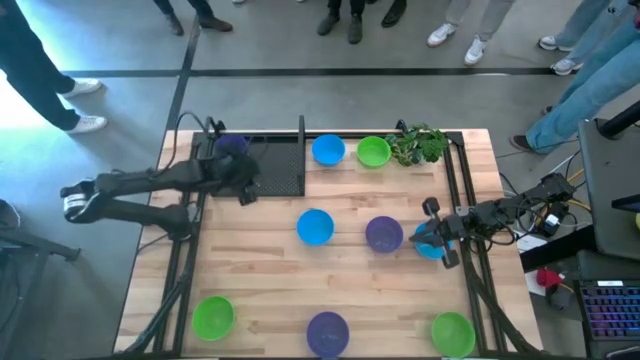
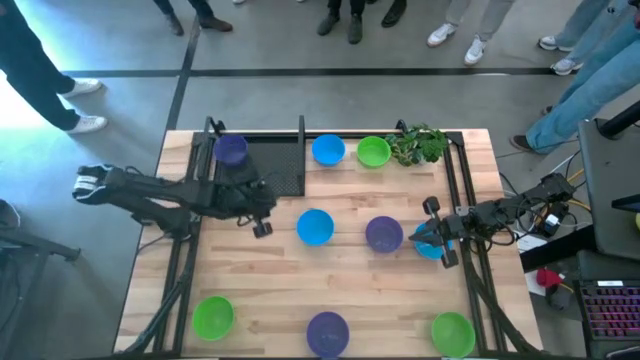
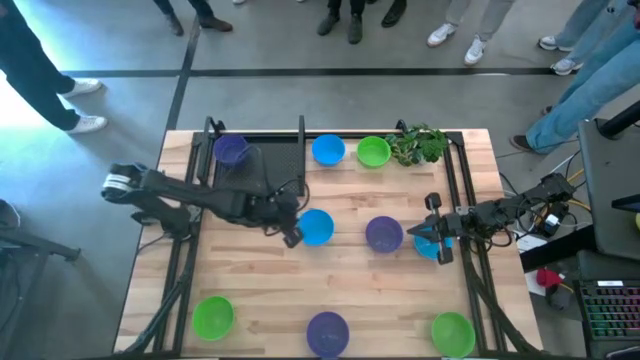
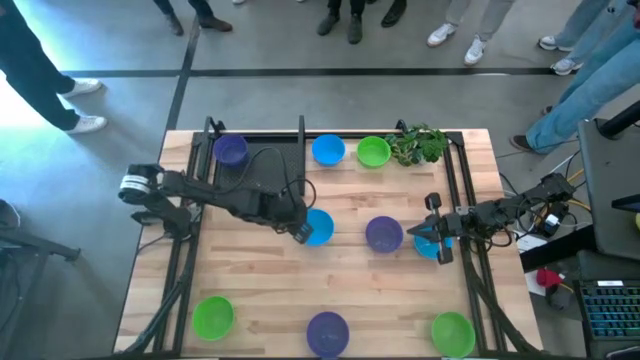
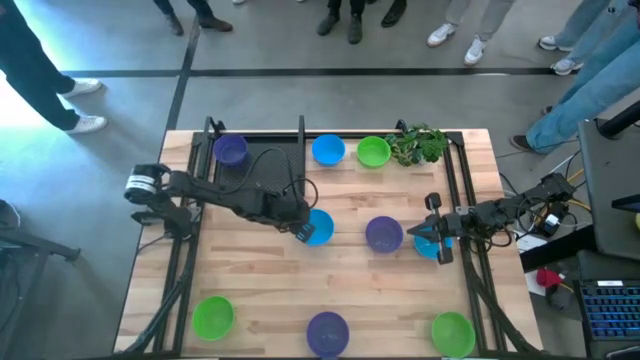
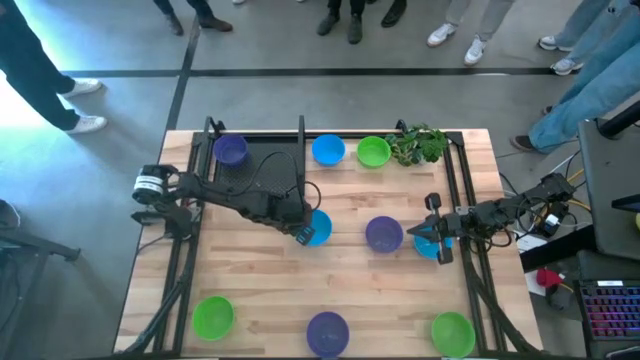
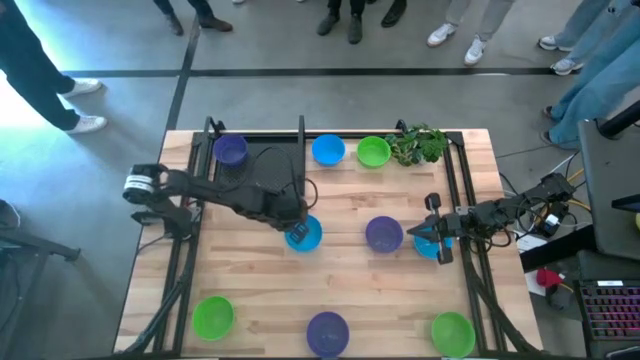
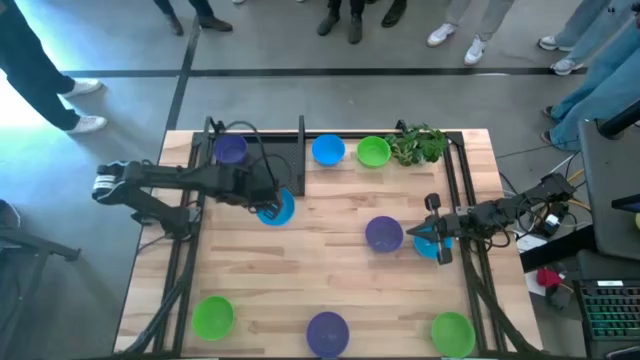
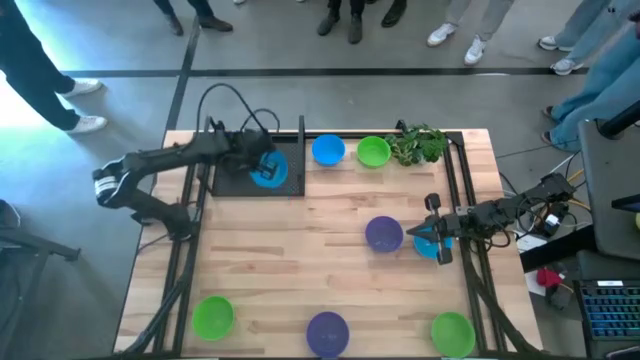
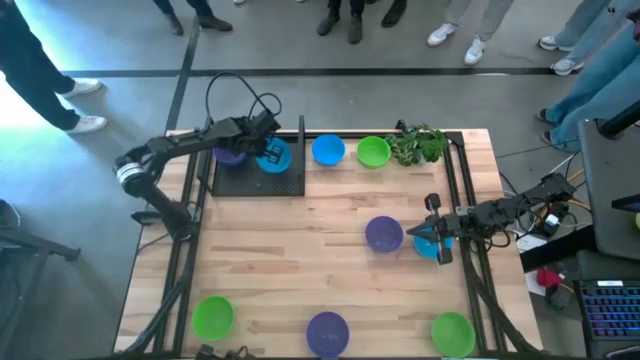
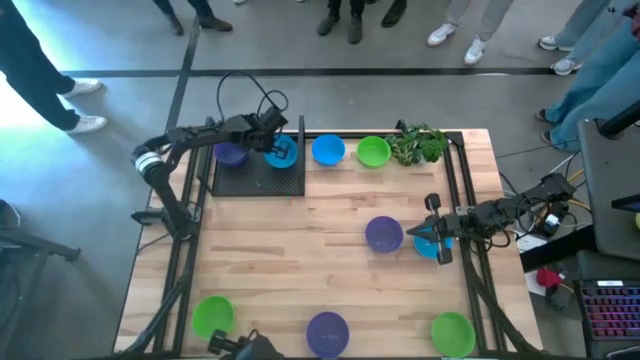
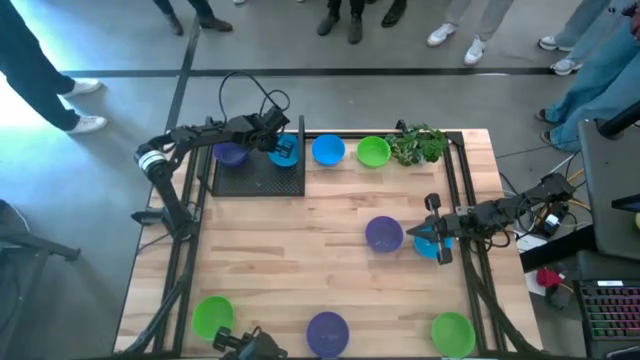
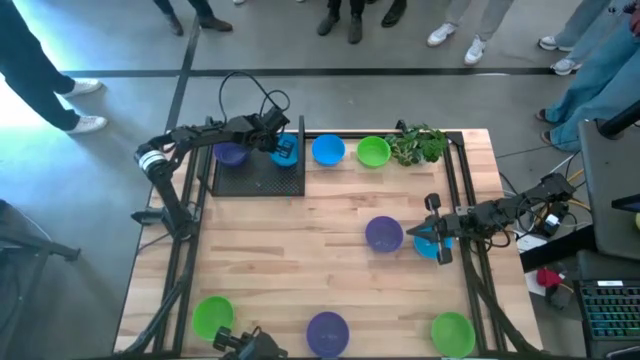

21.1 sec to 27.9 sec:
Task: Pick & Place Mini bowls
Put the bottom left blue bowl on the shelf

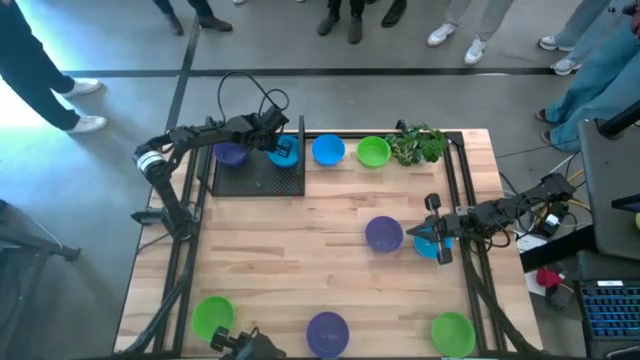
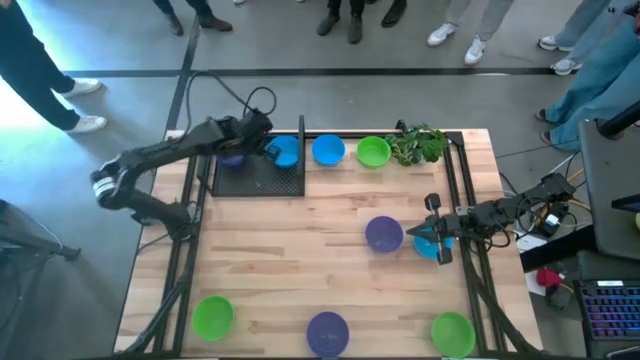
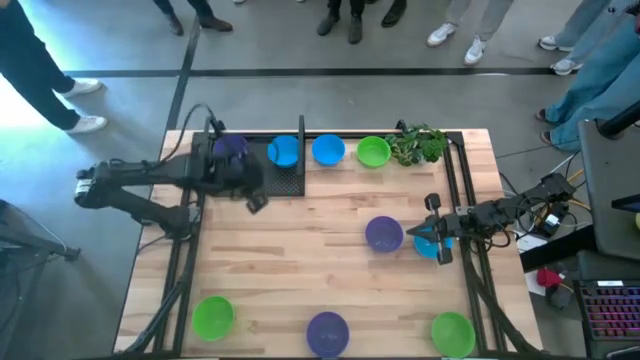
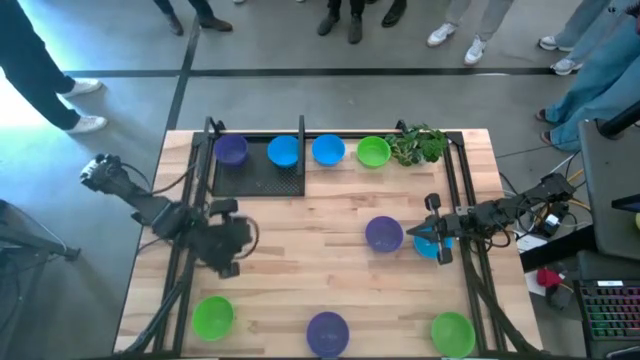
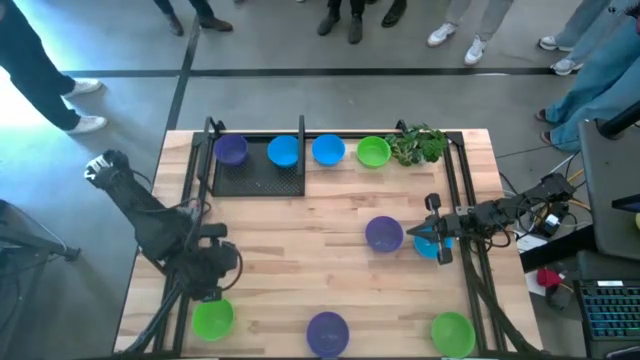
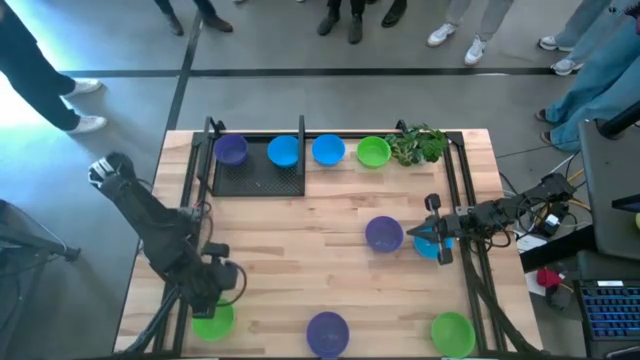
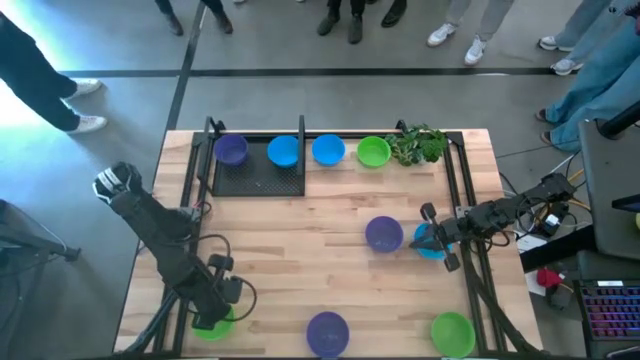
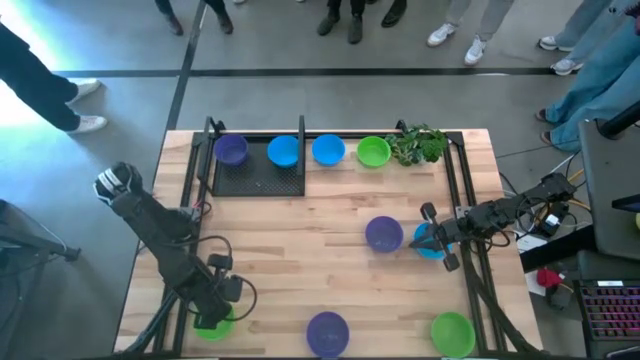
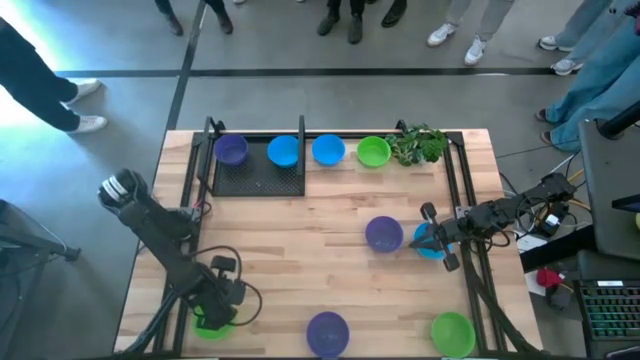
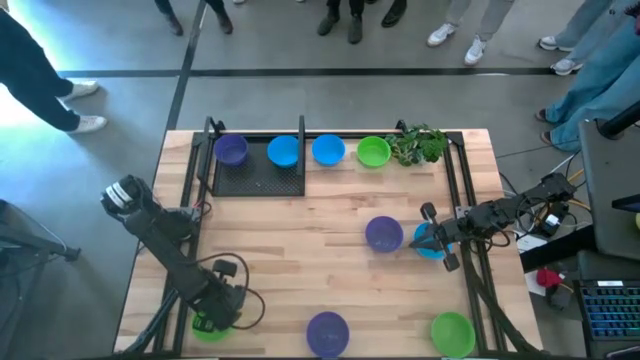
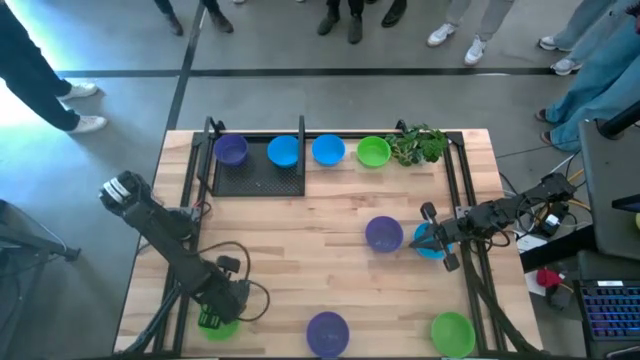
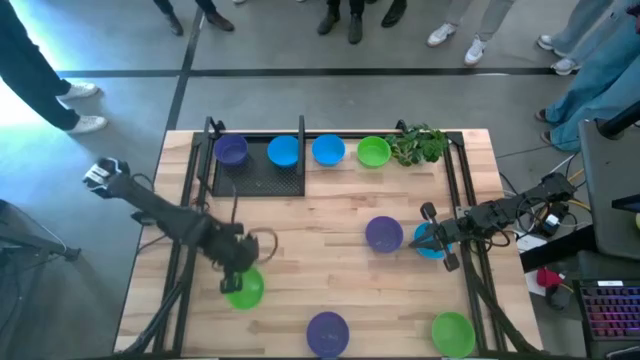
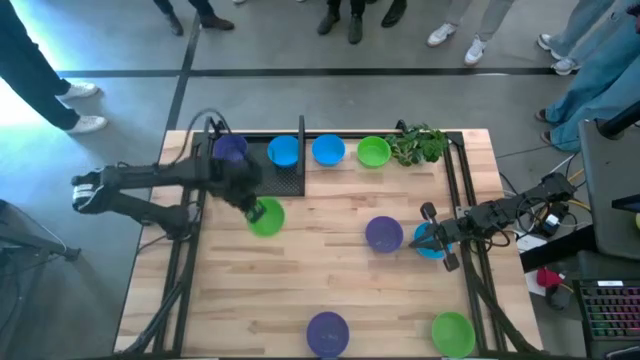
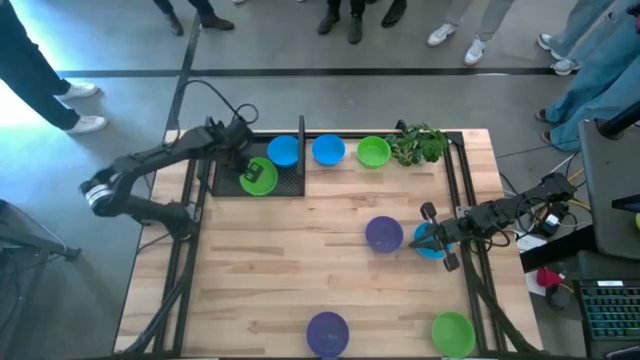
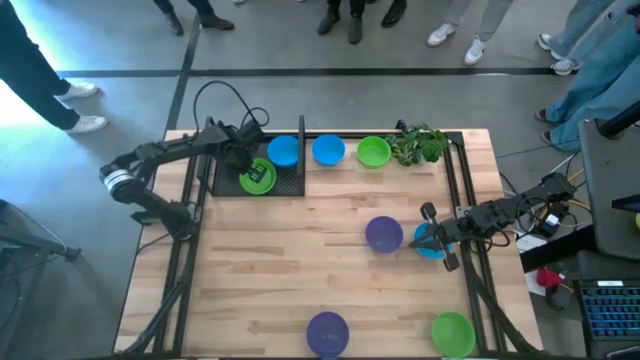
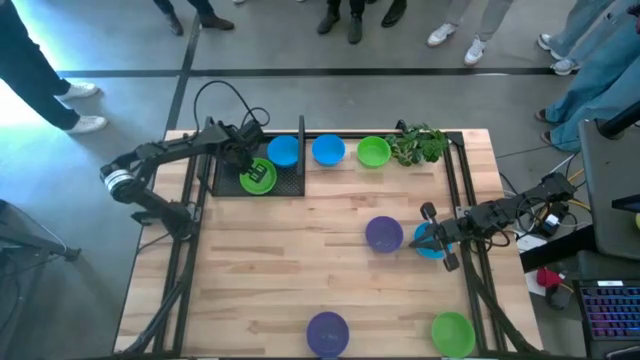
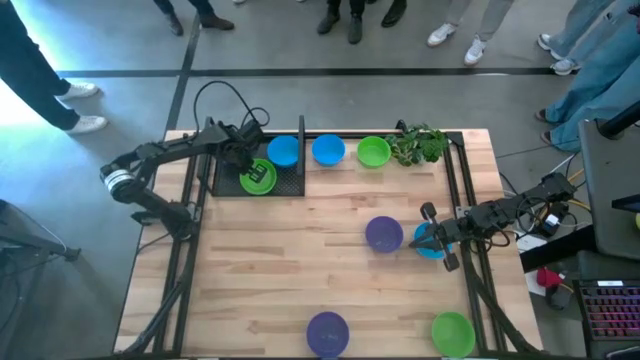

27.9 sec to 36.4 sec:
Put the bottom left green bowl on the shelf
